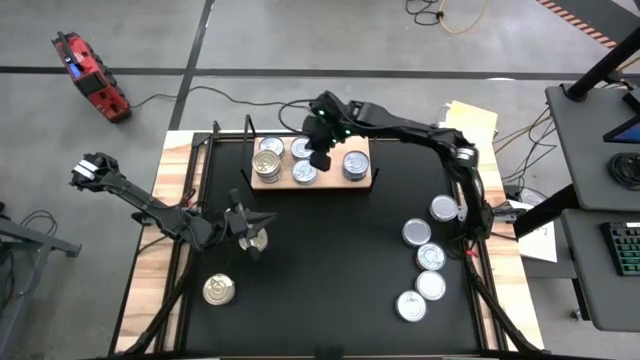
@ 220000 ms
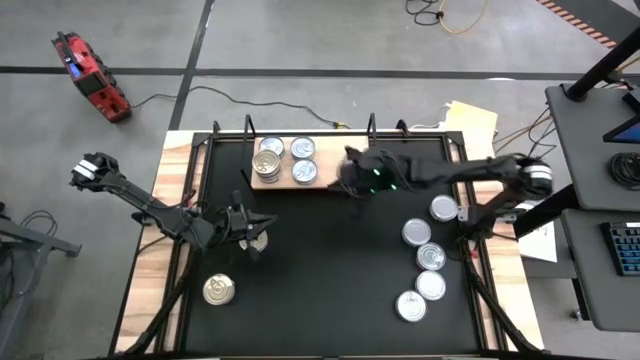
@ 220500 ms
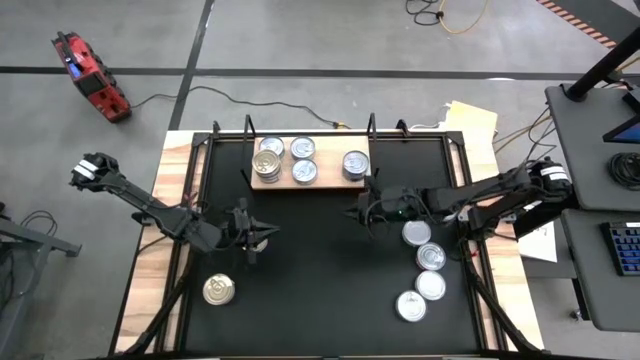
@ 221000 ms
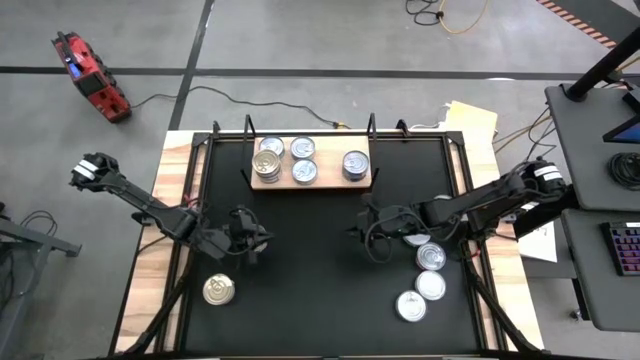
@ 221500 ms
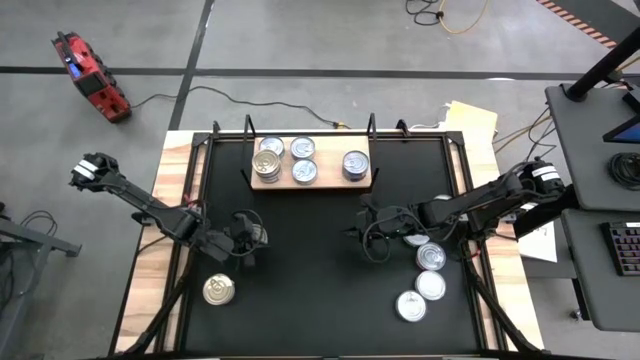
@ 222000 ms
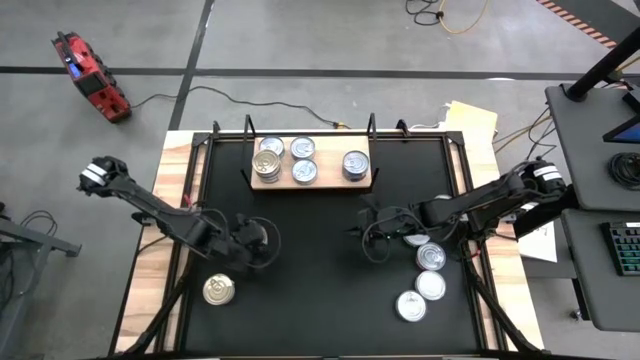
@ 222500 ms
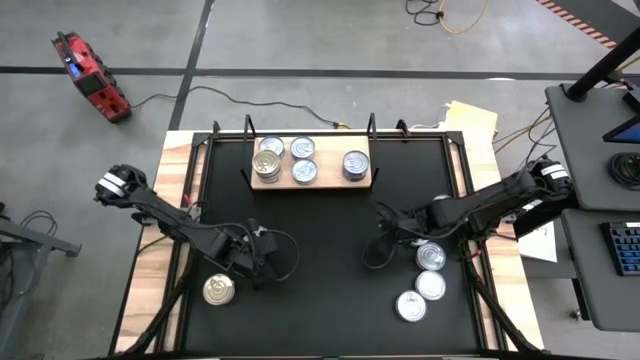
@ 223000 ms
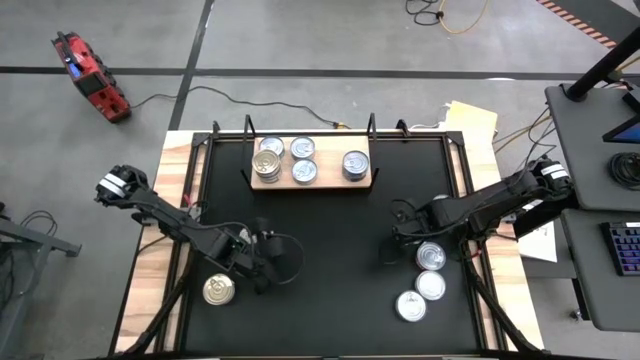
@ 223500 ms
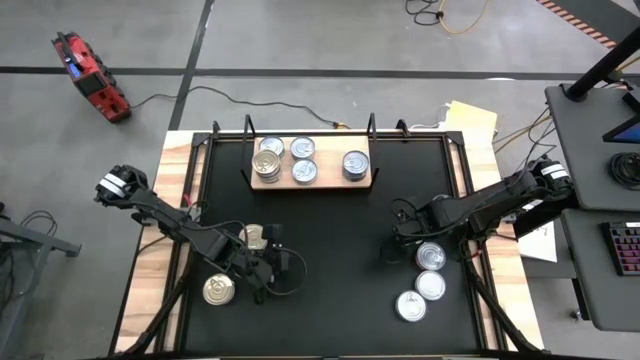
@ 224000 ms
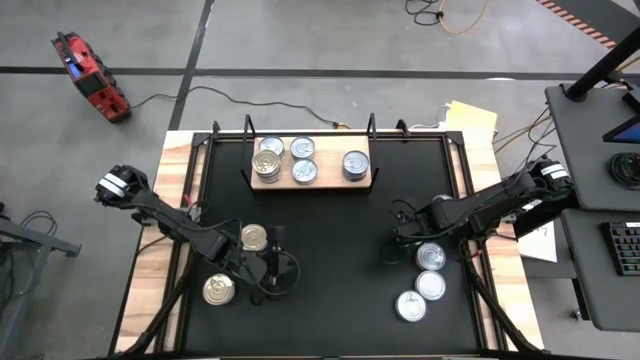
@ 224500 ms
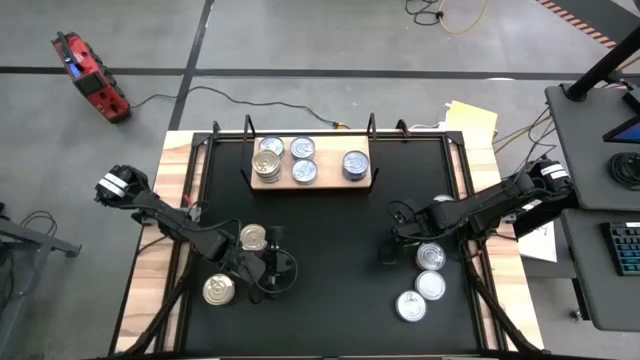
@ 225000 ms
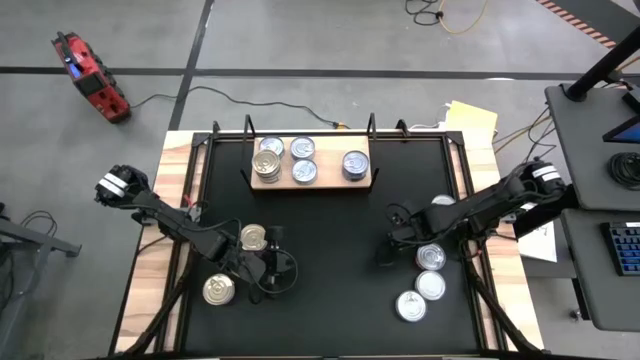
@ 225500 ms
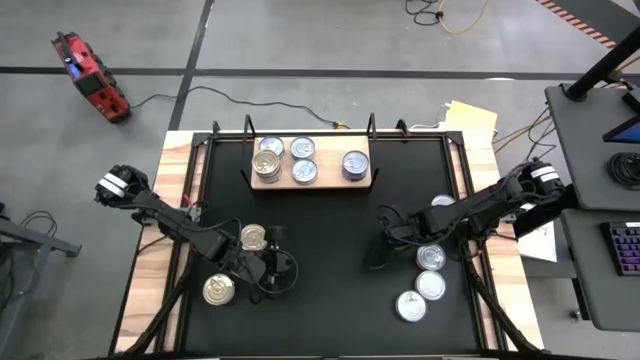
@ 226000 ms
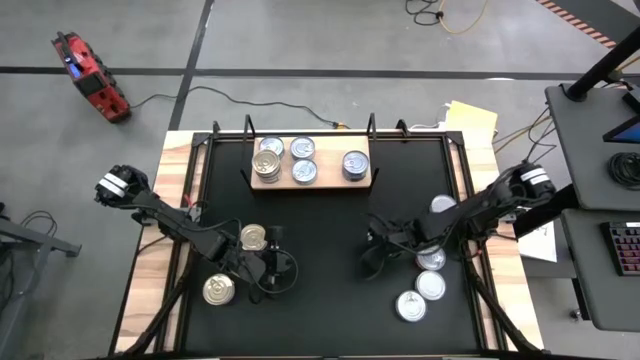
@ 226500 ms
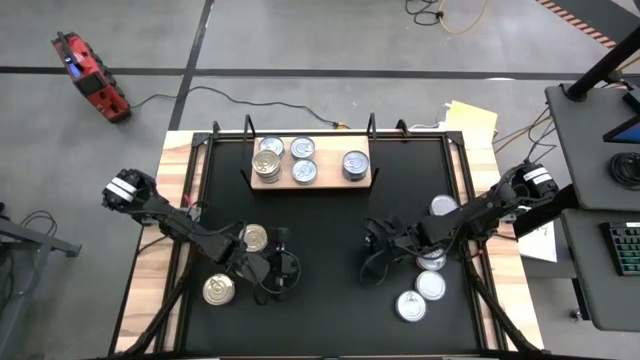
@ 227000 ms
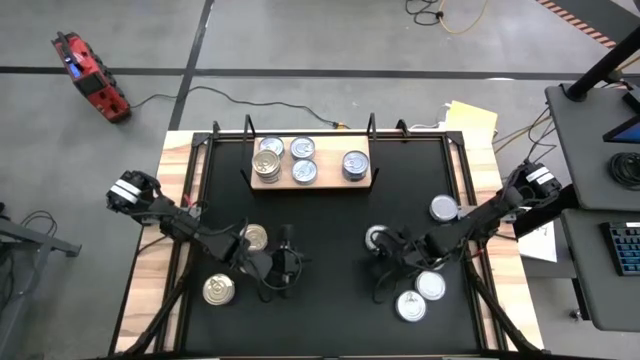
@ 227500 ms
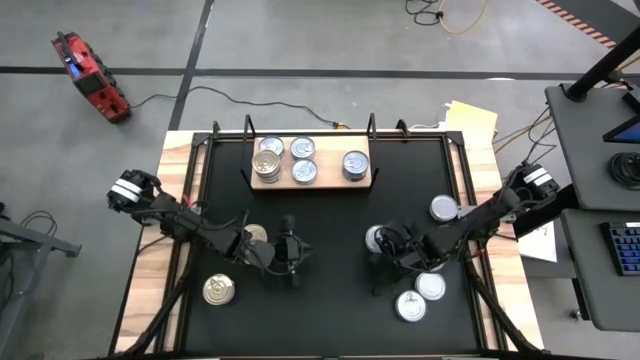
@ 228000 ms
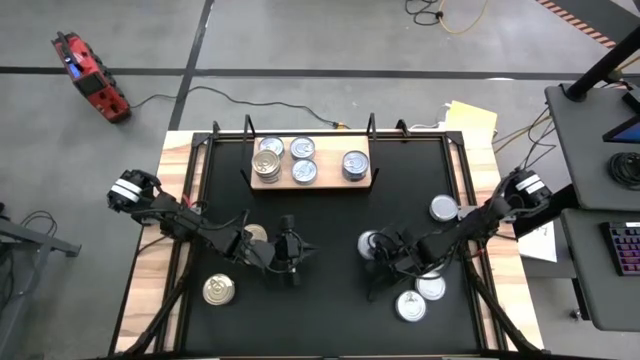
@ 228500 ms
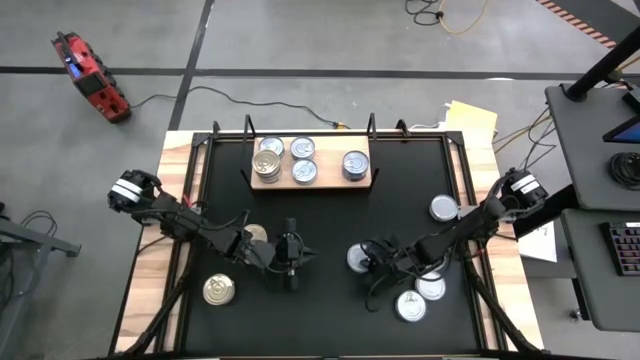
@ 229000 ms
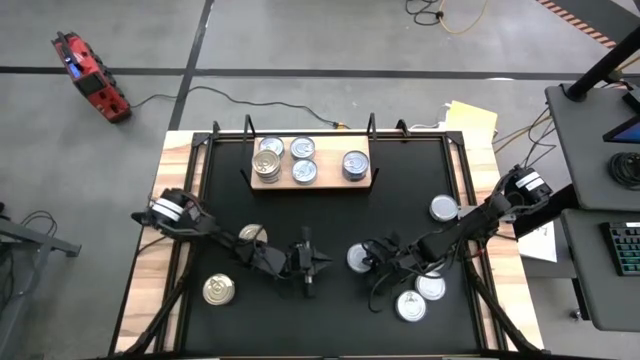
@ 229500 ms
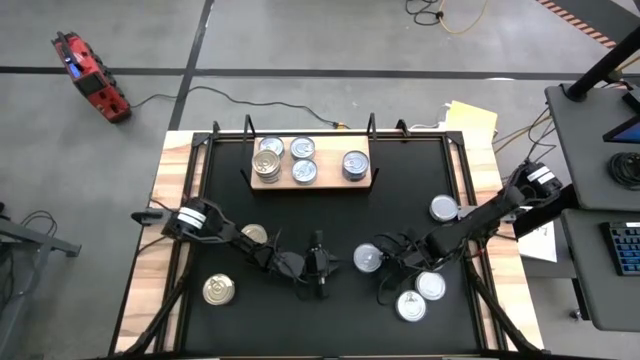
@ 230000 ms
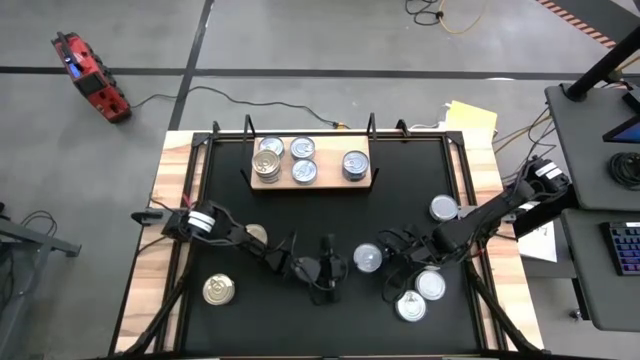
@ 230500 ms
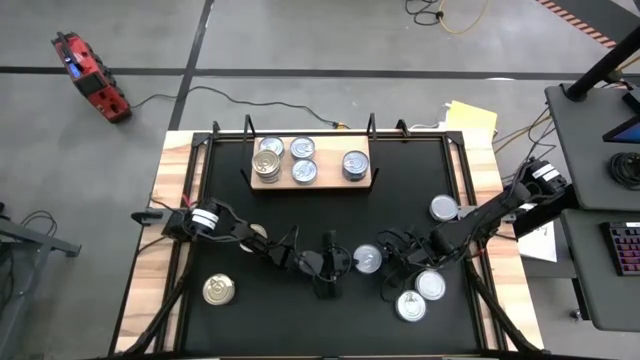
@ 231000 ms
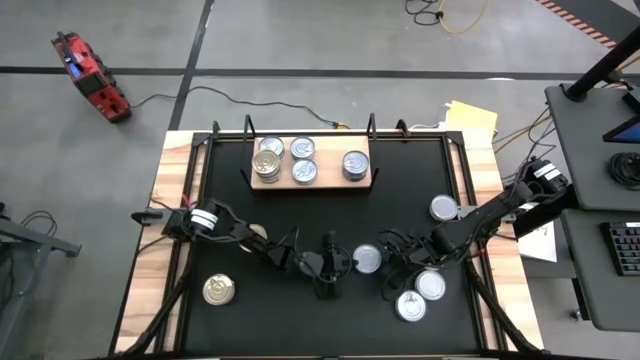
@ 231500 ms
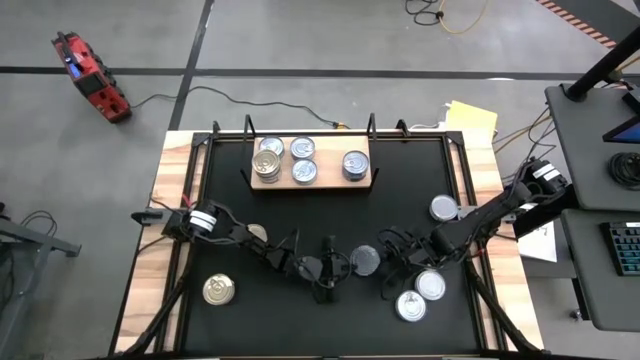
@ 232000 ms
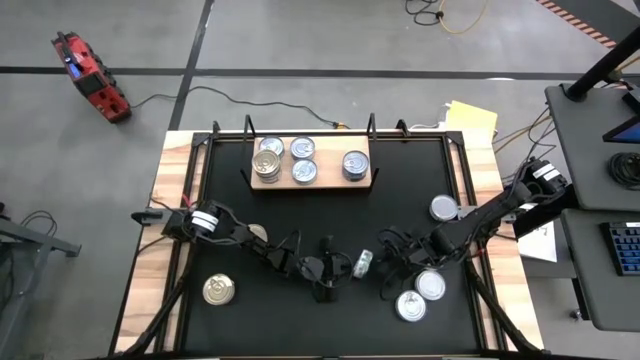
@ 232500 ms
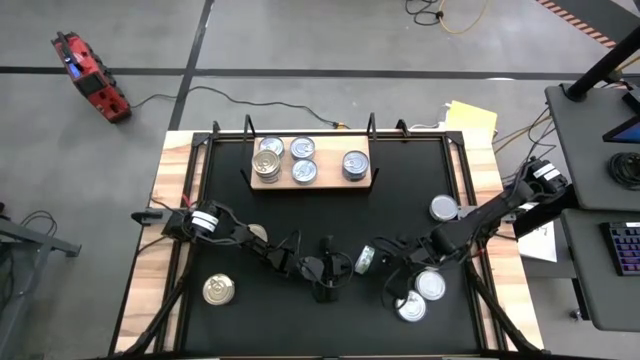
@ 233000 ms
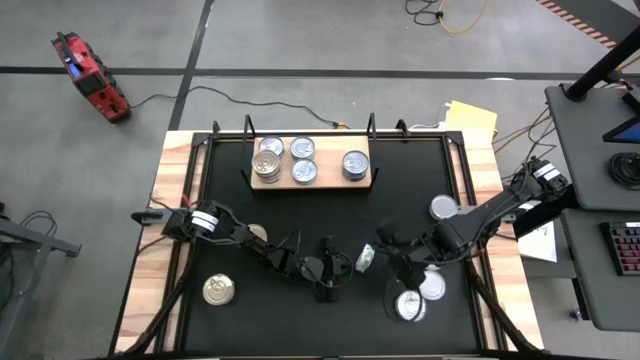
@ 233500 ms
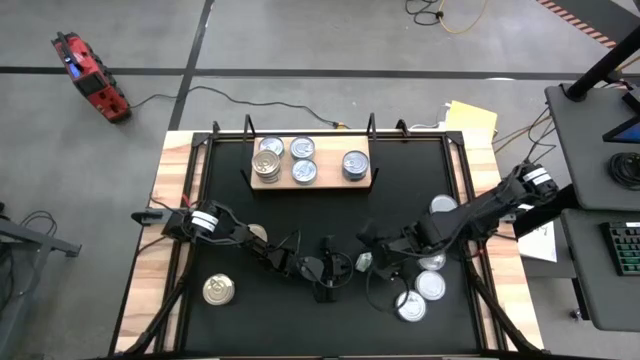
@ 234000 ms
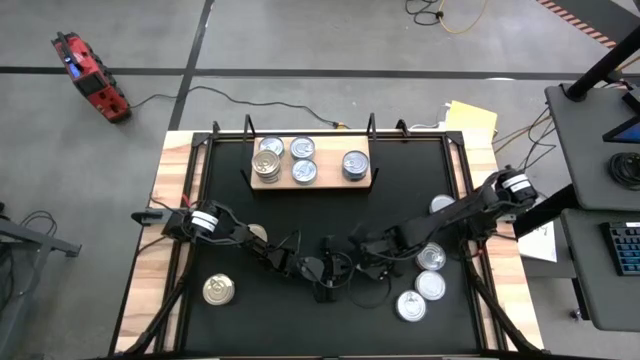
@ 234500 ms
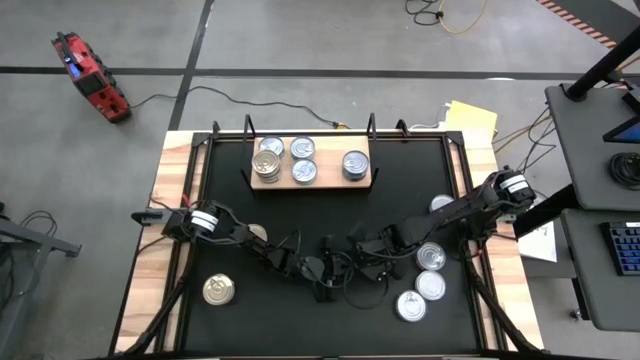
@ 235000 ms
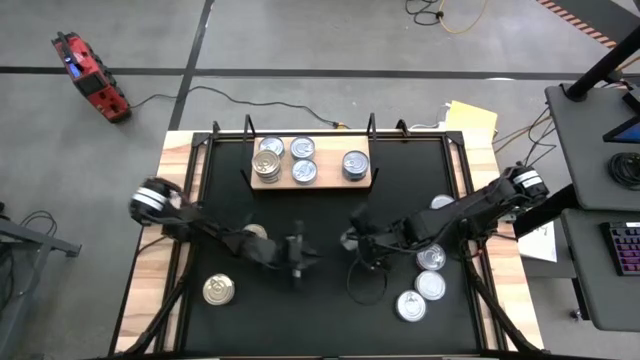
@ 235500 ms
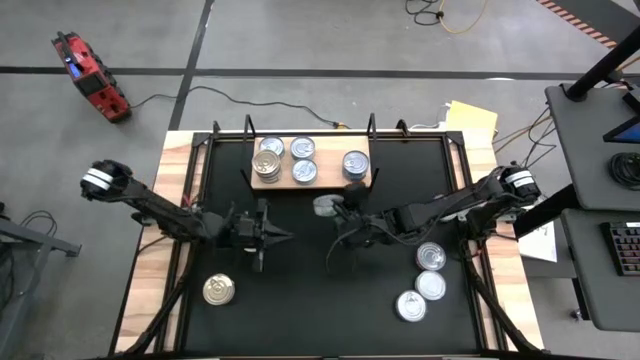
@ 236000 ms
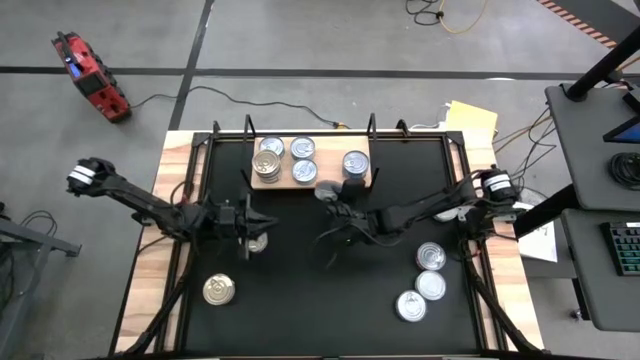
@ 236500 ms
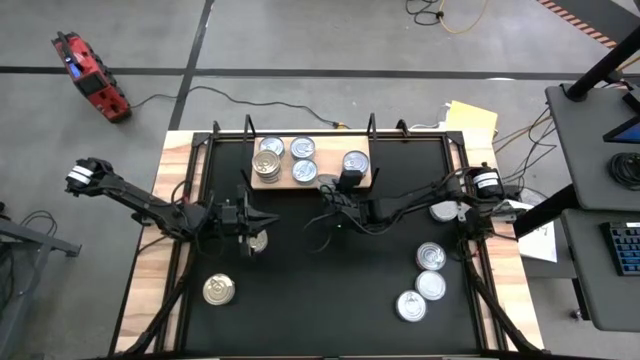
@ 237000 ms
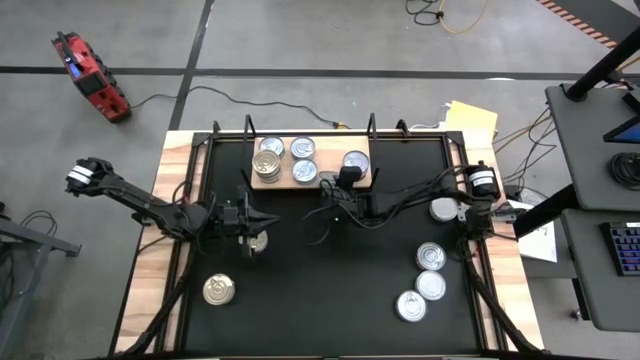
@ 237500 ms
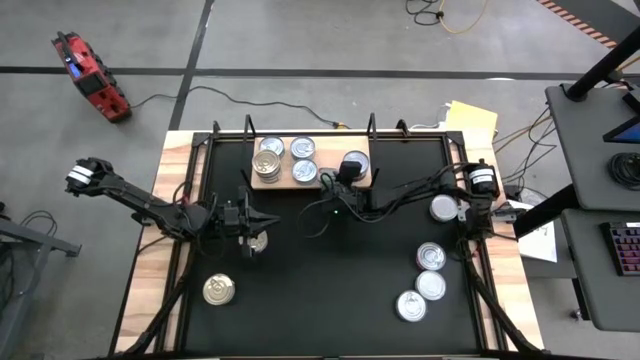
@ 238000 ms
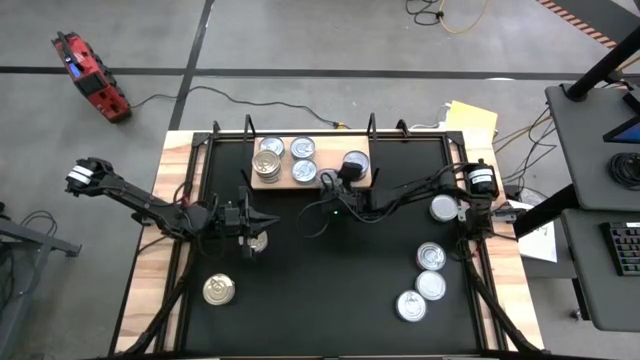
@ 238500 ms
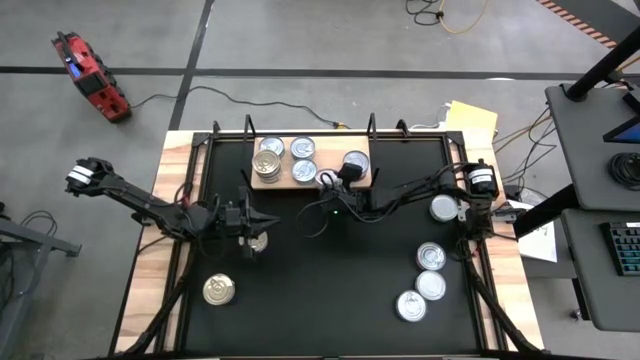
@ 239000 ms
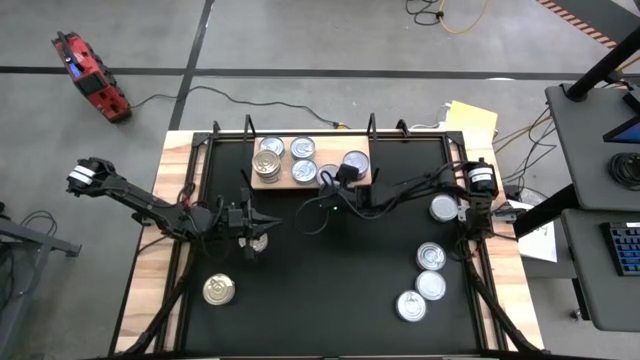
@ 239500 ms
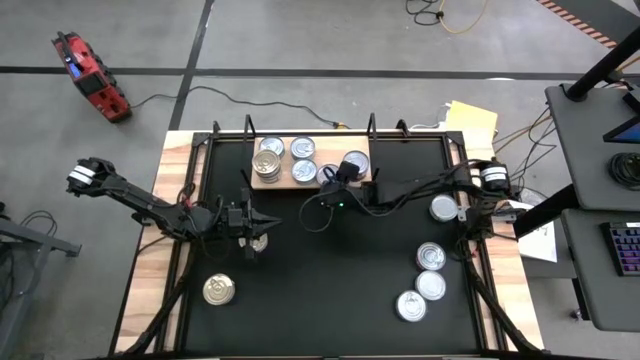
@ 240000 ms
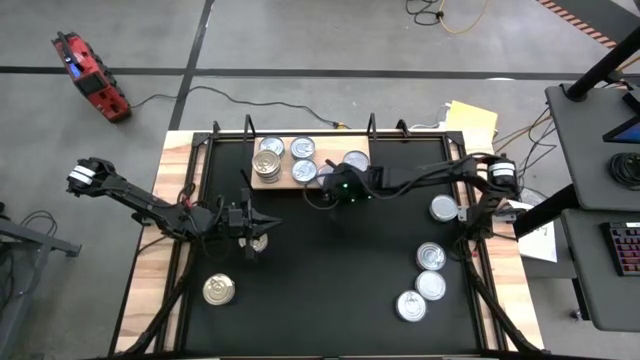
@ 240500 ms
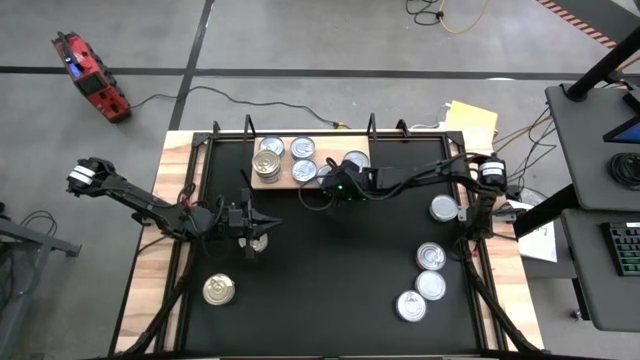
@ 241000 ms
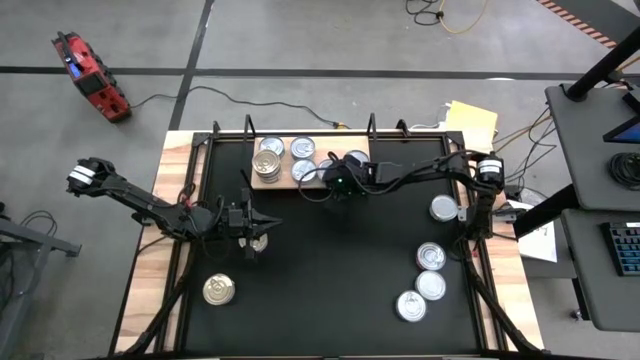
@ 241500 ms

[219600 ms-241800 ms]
Task: Stack canned seafood by type on shelf
Put the green tuna can on the shelf
